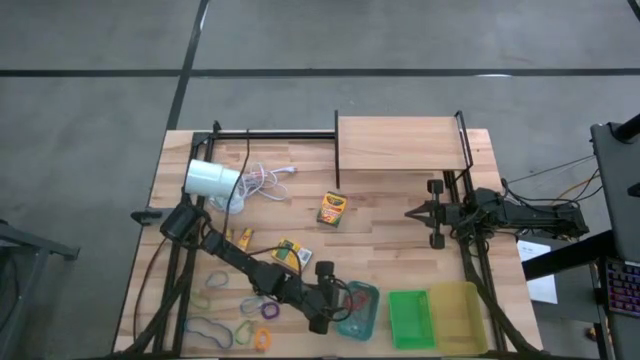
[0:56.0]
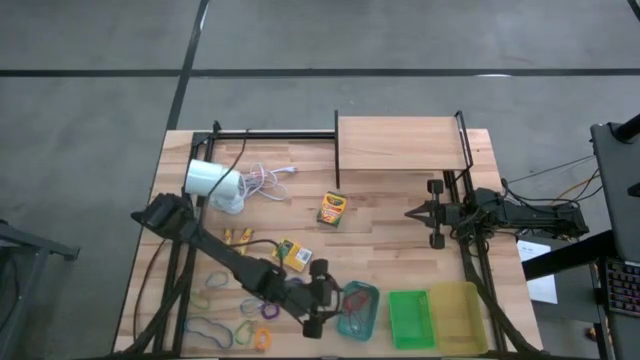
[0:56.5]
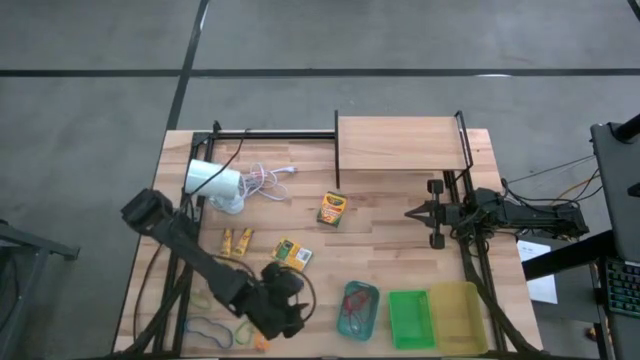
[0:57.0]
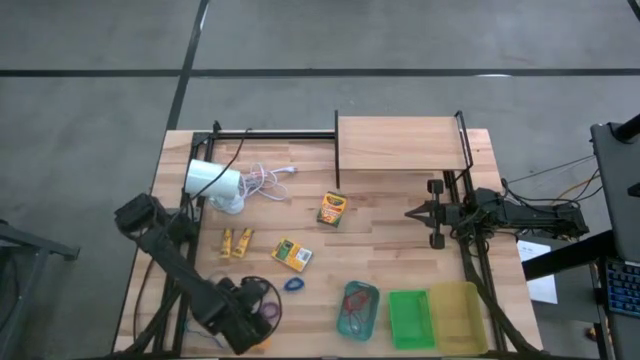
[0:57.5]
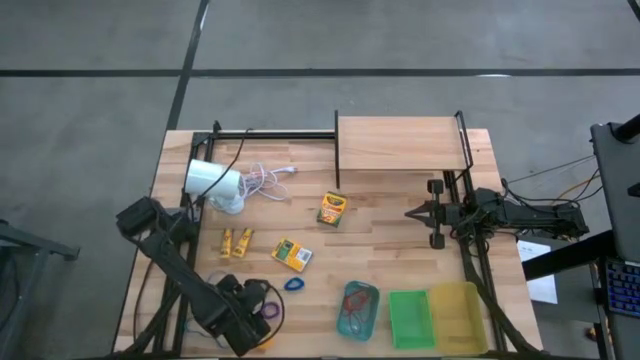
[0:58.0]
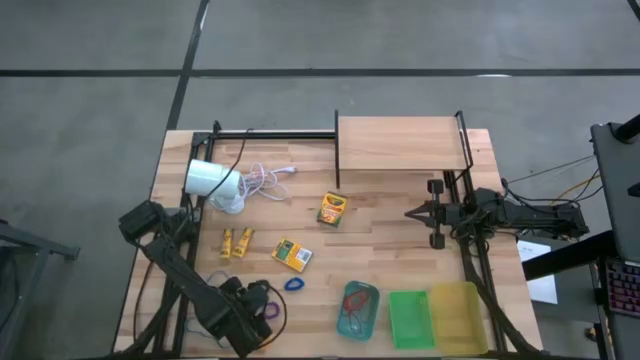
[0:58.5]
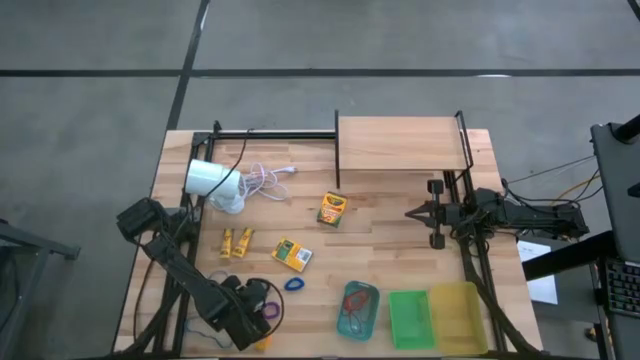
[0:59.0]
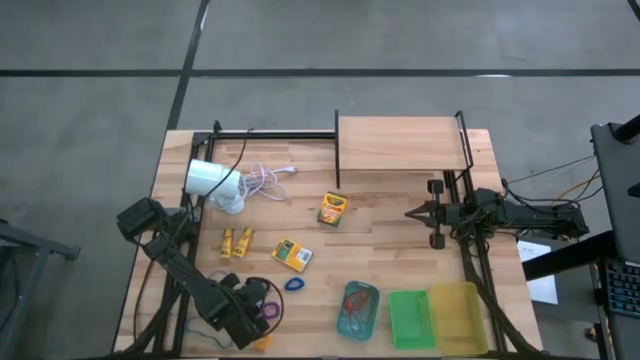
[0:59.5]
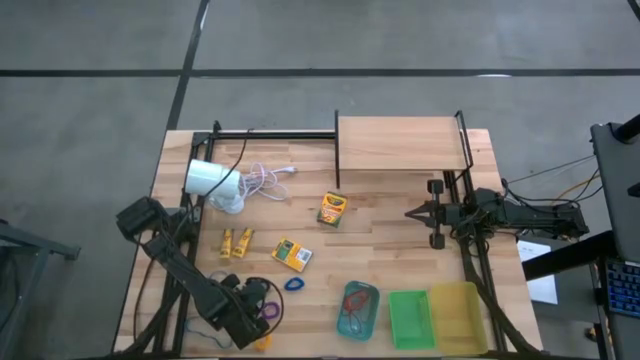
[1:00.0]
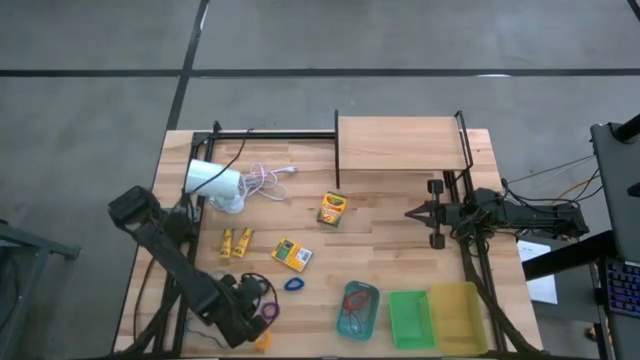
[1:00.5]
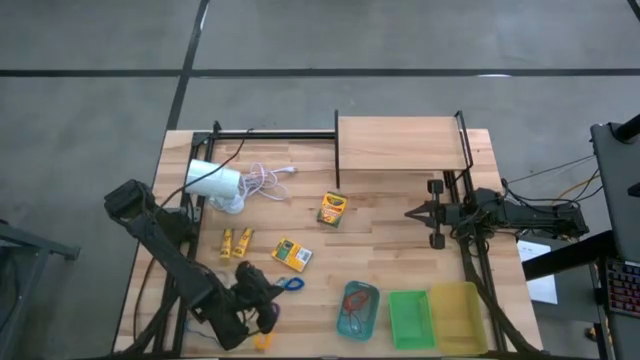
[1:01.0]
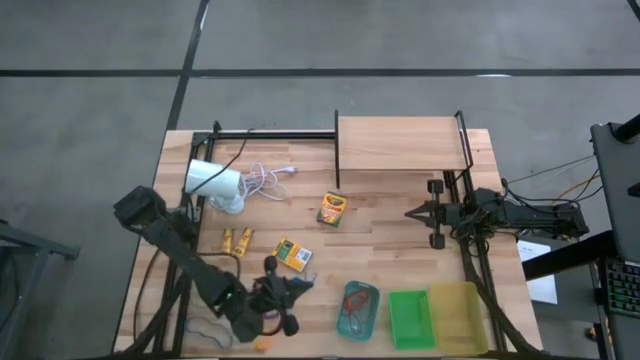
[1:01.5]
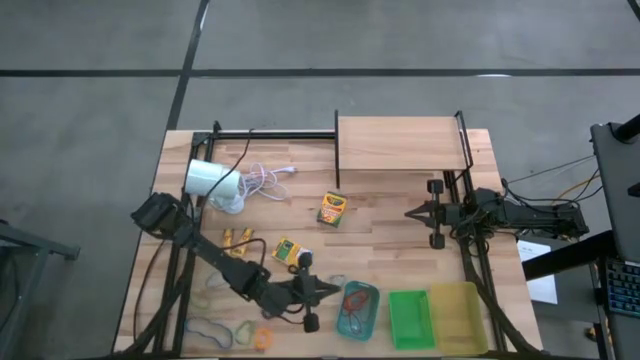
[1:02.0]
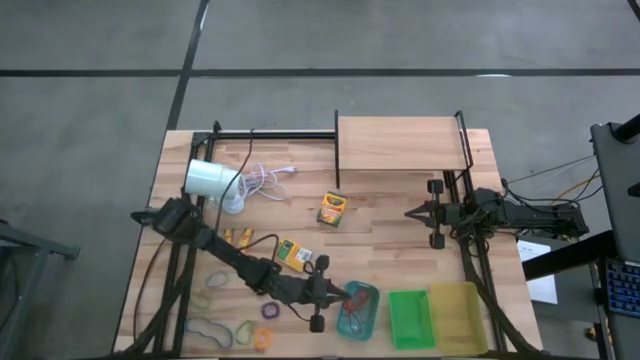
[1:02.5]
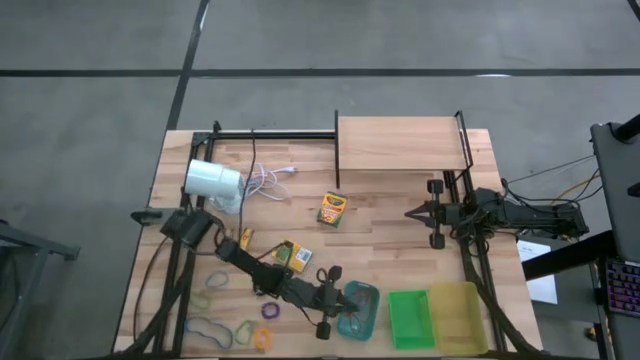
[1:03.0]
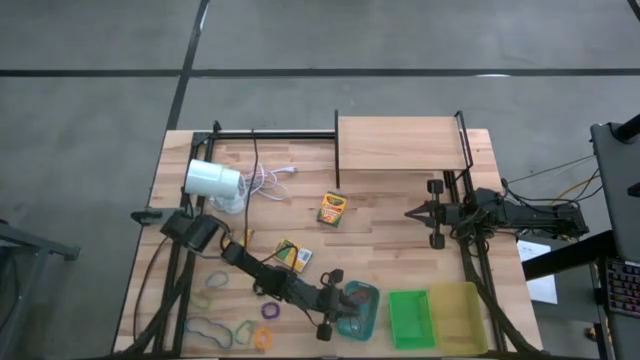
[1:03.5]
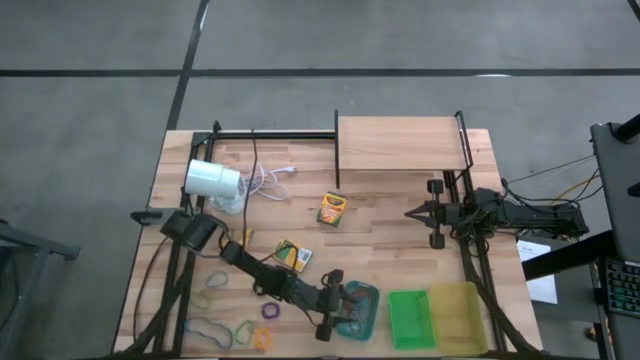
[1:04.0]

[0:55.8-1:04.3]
Task: Pick & Place Office Desk Supplies
Put the blue rubber band into the blue bin

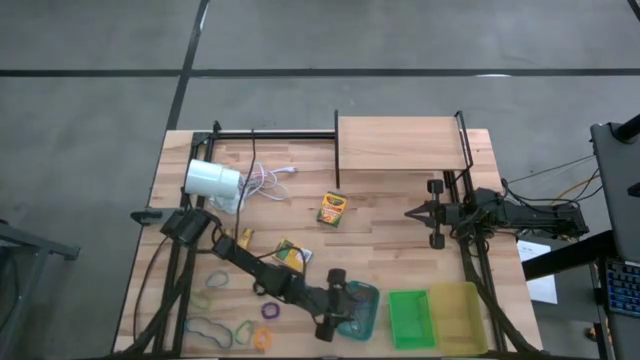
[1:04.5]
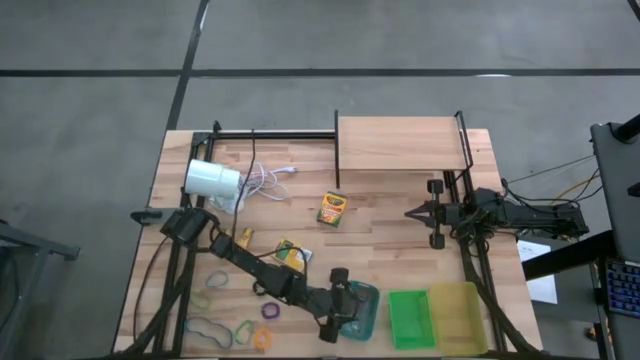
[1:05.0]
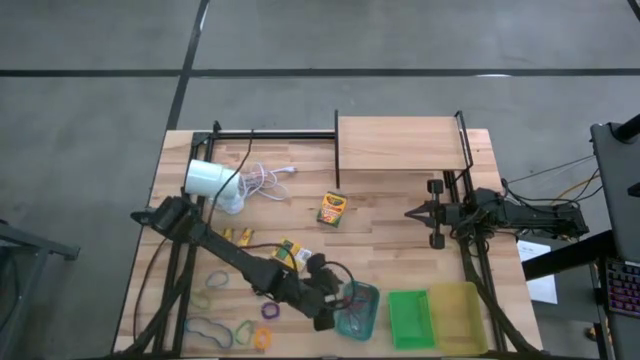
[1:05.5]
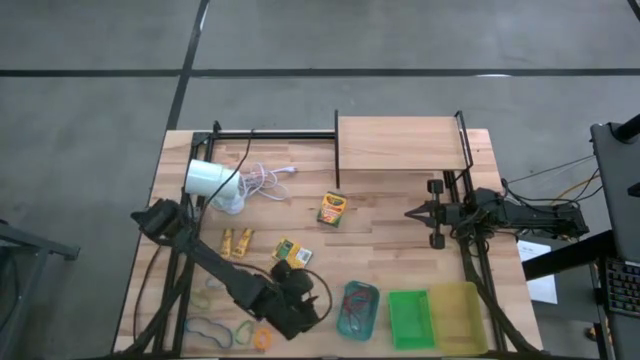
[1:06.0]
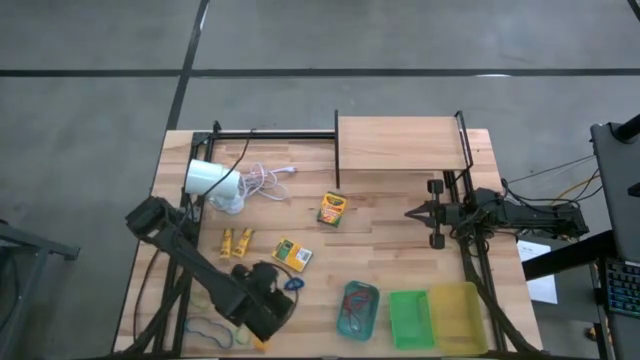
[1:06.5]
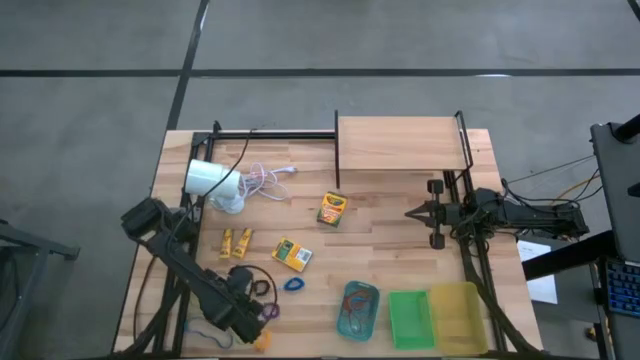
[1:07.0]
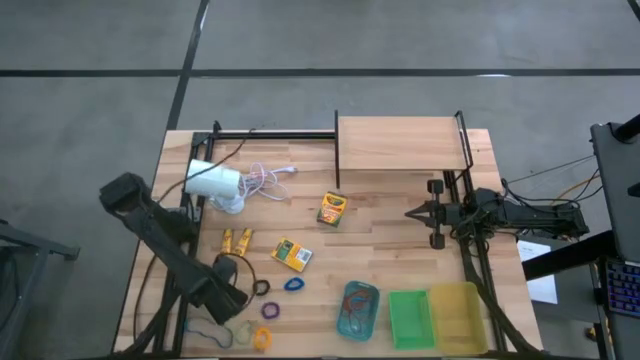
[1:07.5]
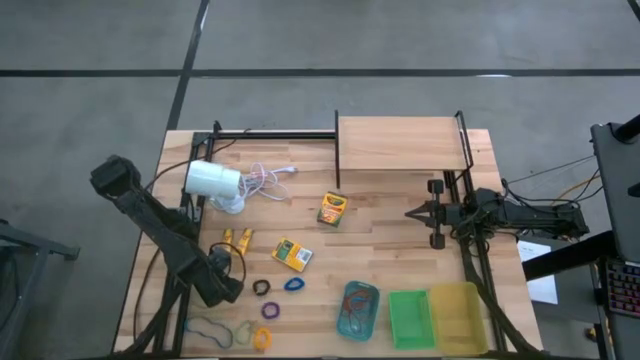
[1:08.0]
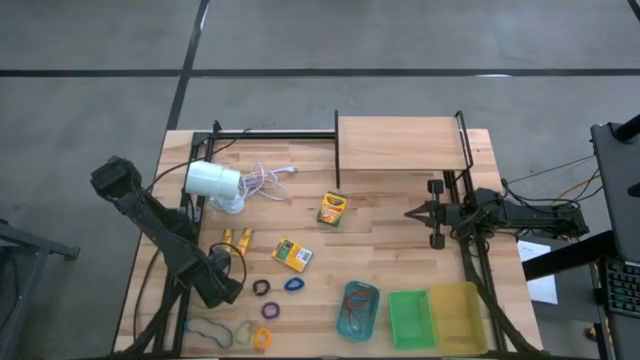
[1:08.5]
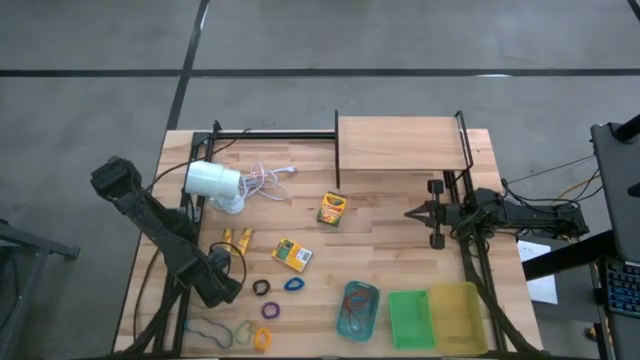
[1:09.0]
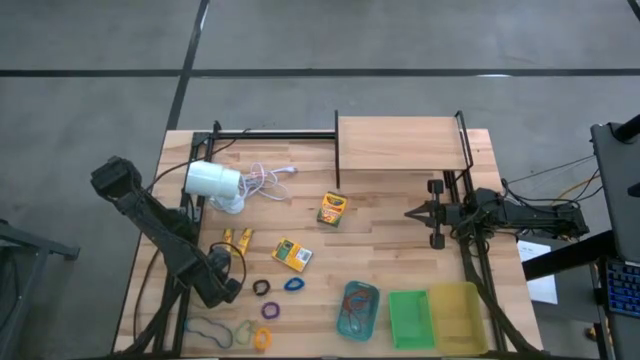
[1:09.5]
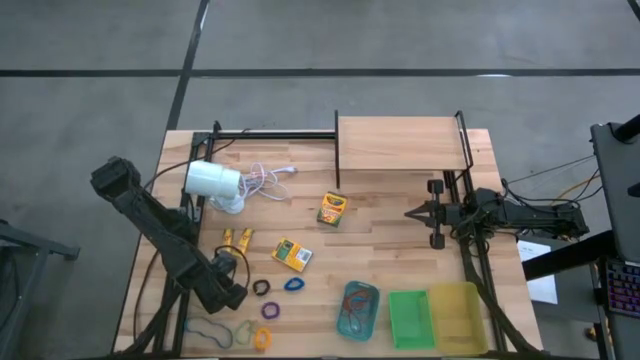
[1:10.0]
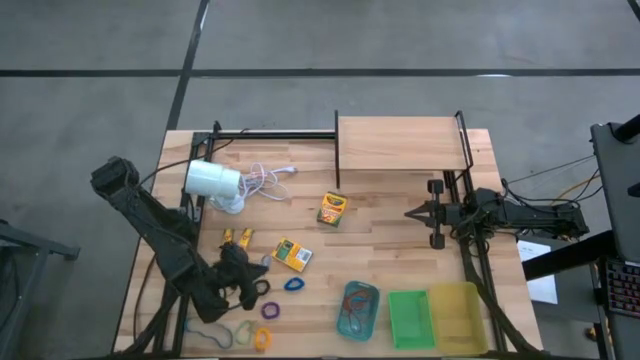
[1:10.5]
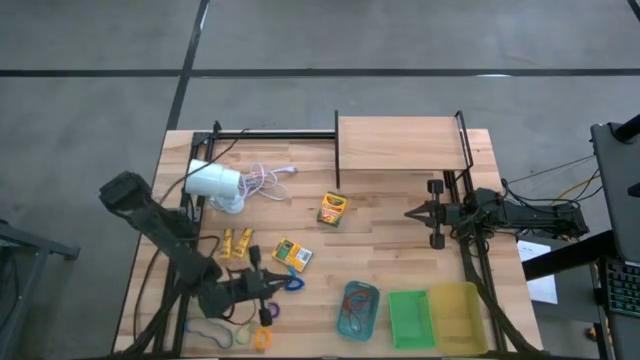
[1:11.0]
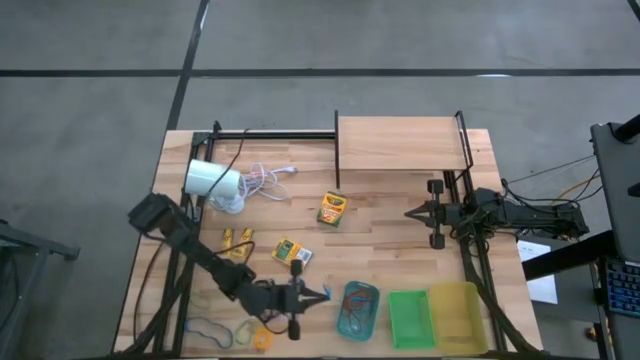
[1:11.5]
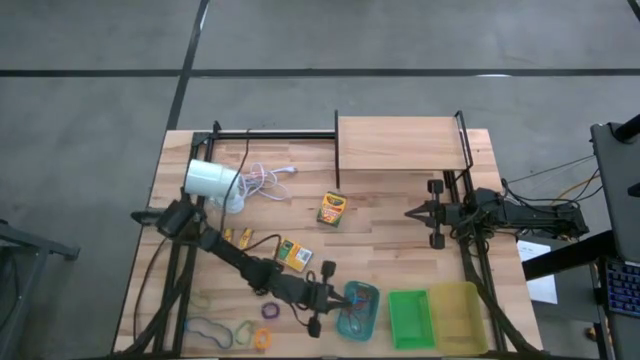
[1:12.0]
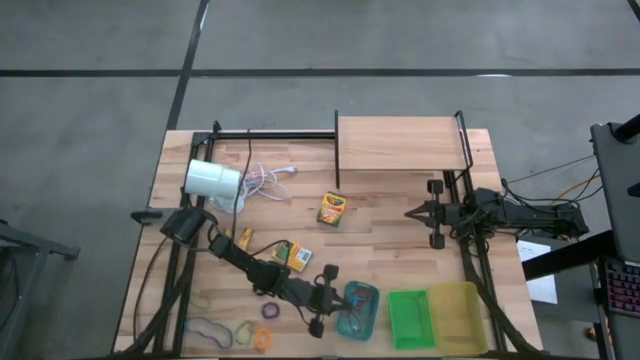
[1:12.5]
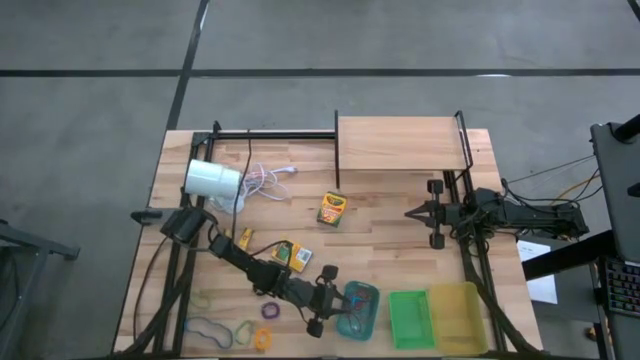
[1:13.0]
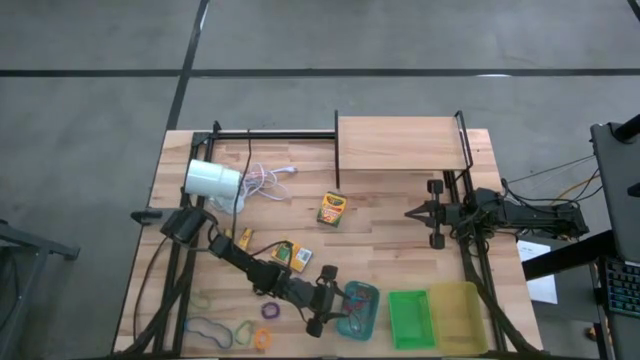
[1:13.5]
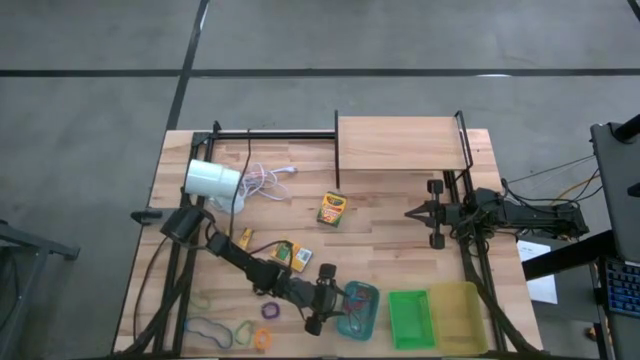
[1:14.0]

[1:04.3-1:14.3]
Put the blue rubber band into the blue bin

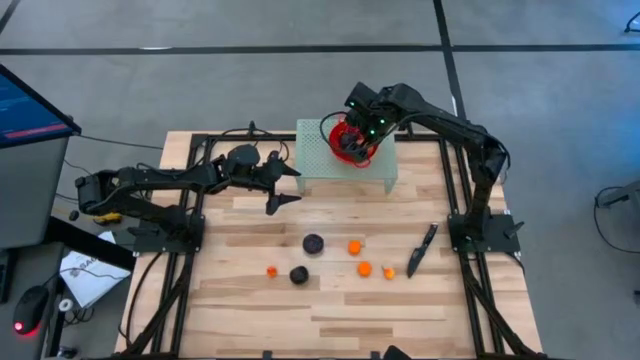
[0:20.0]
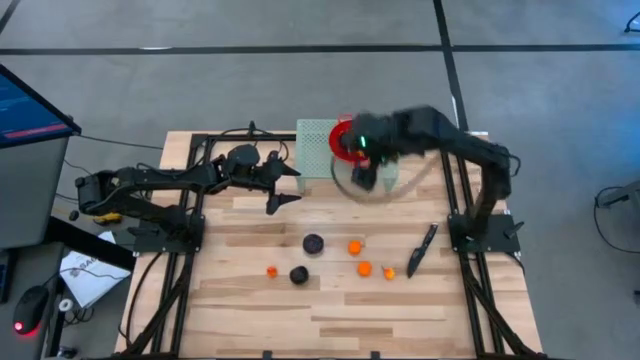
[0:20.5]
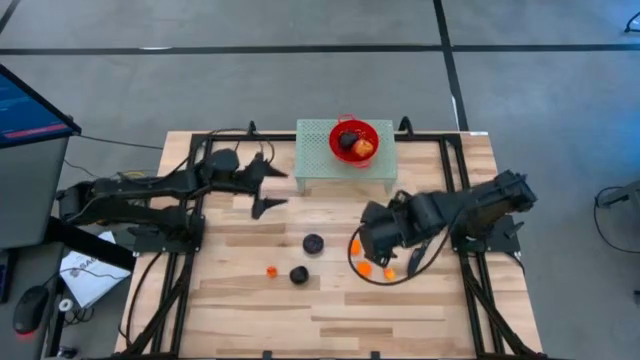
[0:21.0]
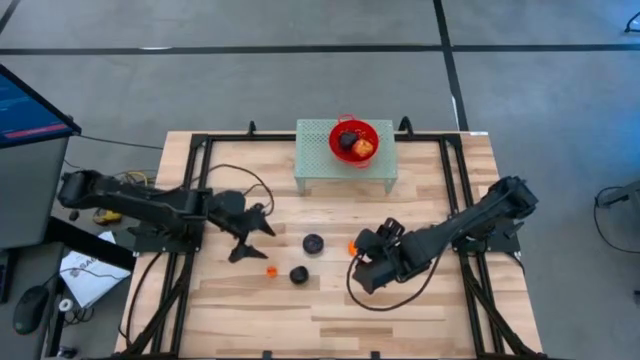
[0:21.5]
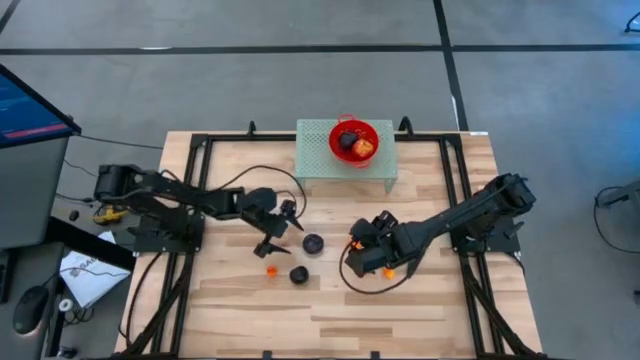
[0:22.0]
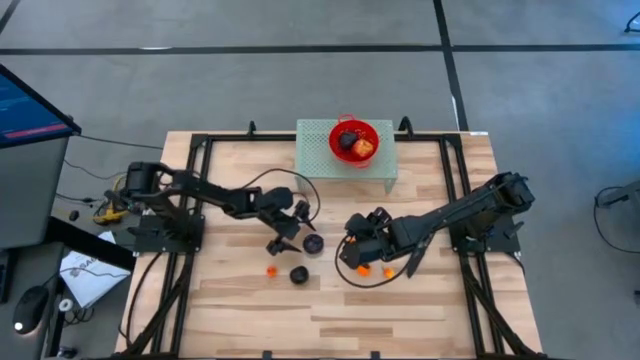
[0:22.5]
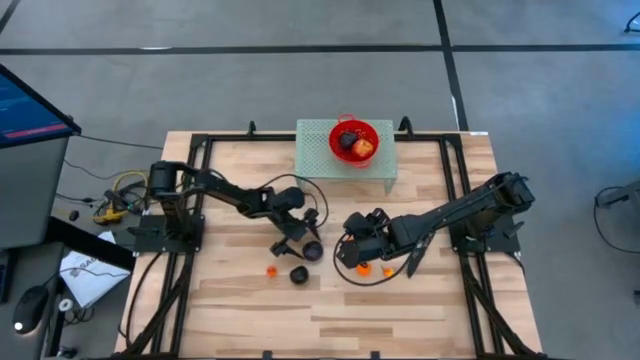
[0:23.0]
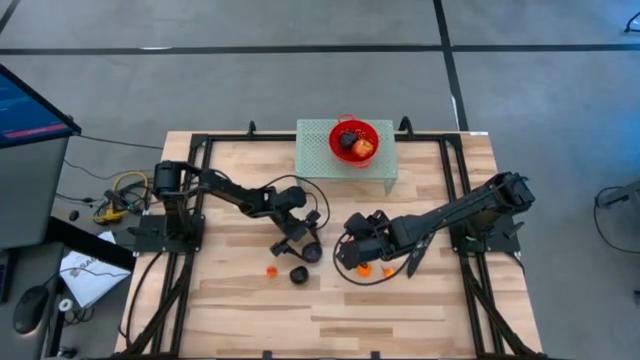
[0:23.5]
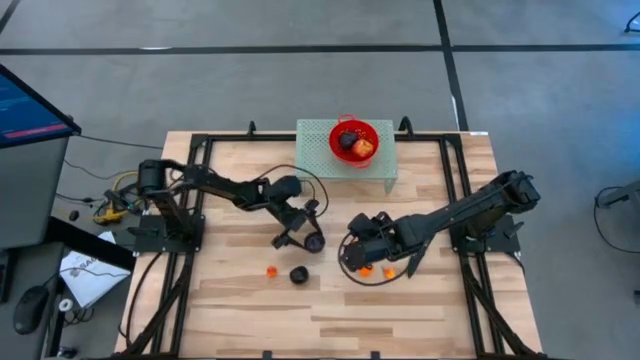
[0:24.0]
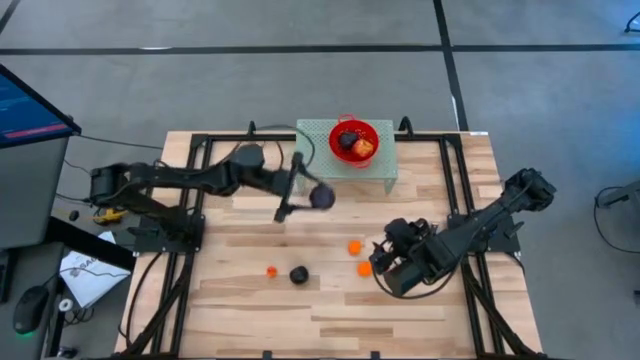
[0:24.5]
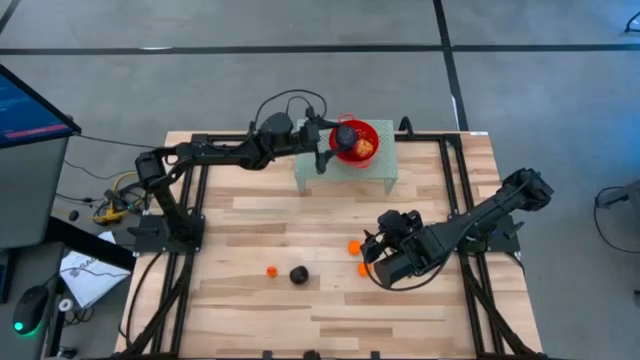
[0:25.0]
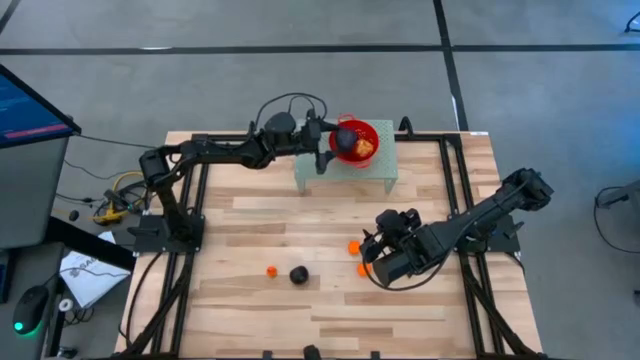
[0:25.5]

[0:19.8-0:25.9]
Task: Pick & Place Fruit
Put the top black plum into the red strainer bowl on the shelf
